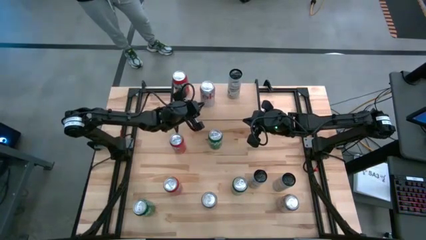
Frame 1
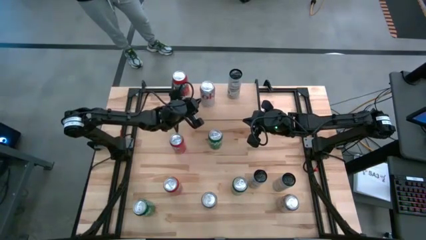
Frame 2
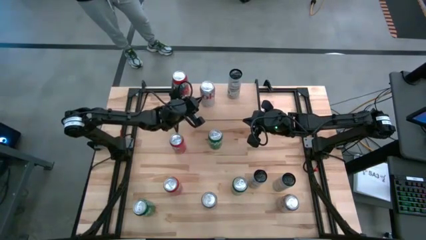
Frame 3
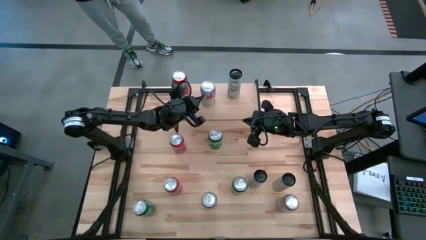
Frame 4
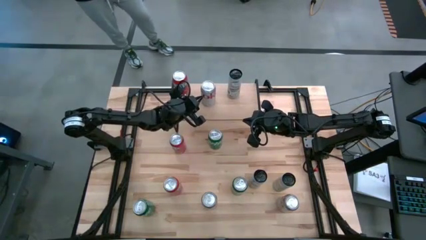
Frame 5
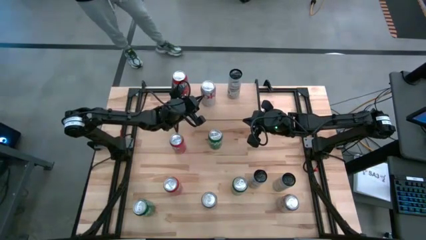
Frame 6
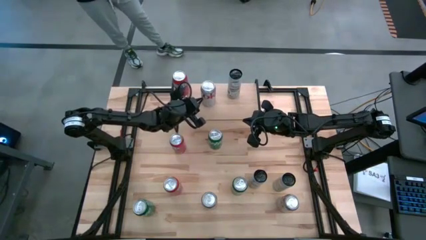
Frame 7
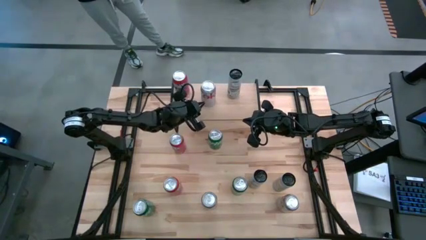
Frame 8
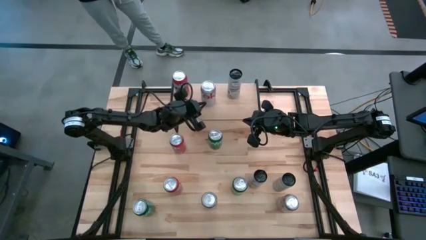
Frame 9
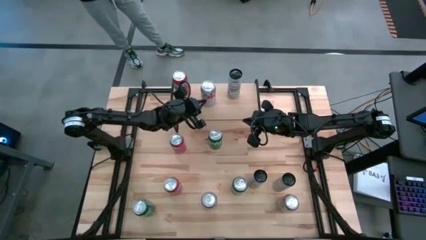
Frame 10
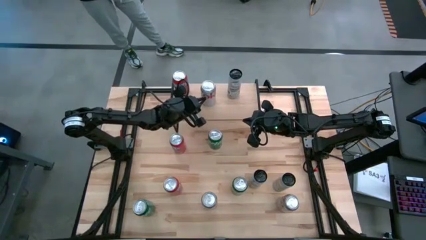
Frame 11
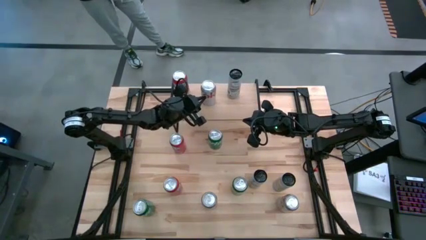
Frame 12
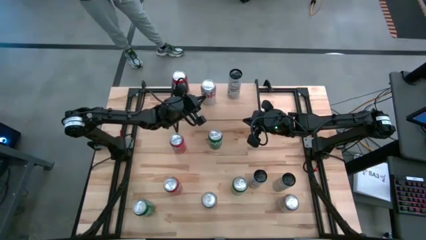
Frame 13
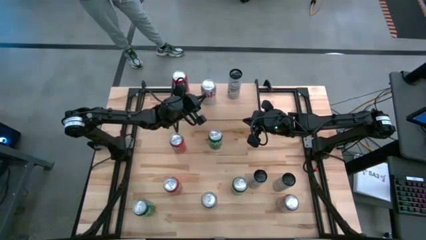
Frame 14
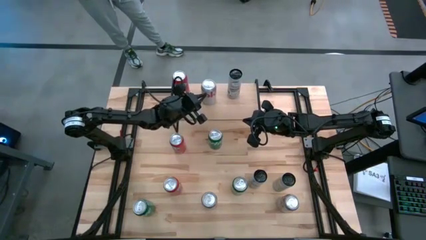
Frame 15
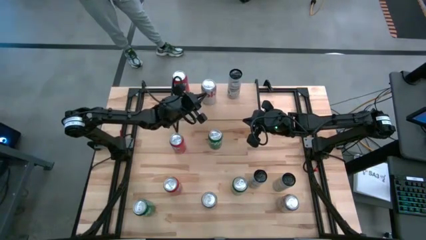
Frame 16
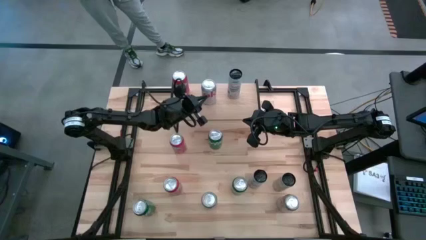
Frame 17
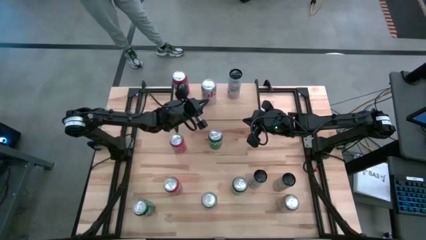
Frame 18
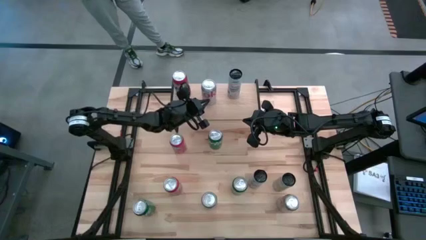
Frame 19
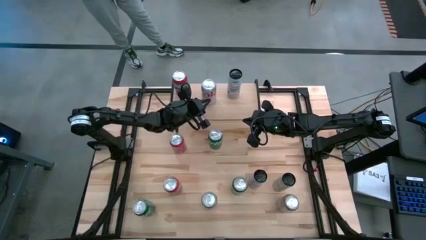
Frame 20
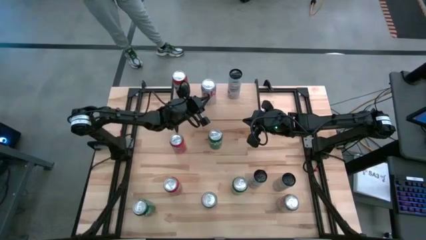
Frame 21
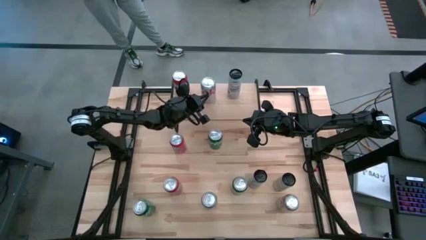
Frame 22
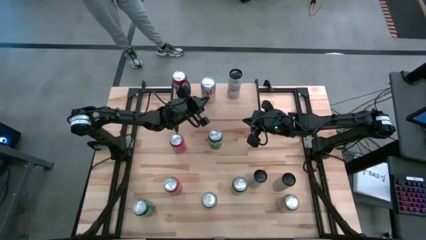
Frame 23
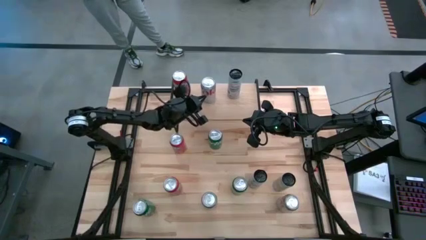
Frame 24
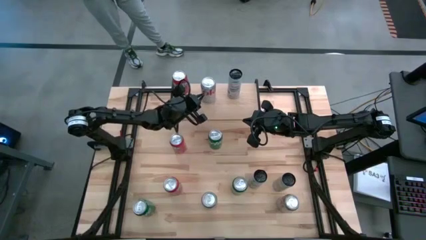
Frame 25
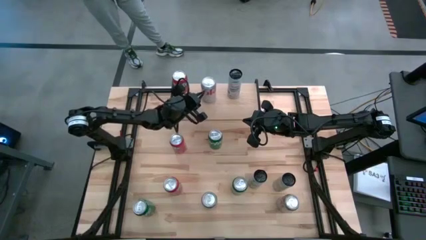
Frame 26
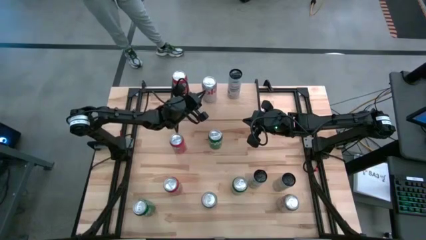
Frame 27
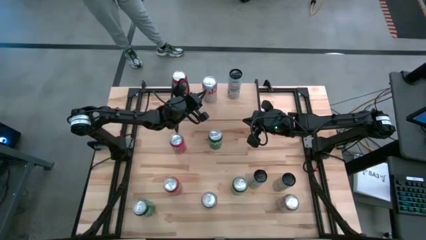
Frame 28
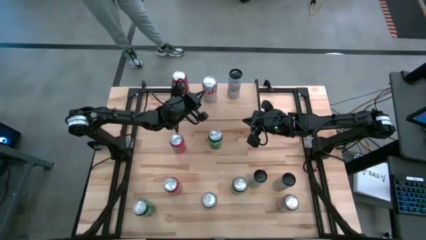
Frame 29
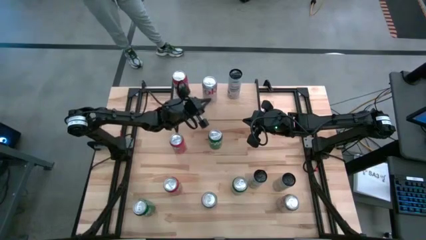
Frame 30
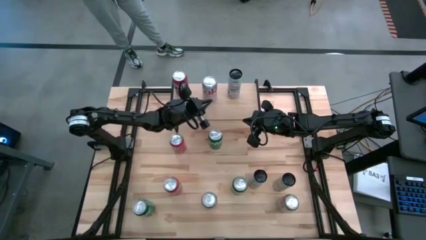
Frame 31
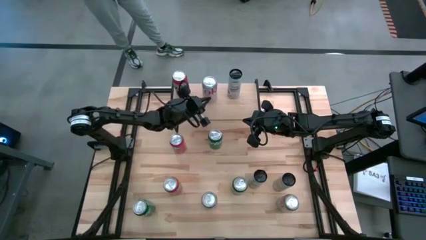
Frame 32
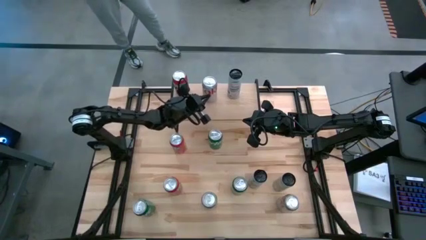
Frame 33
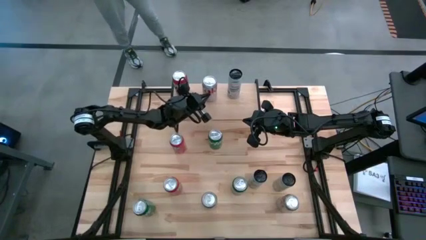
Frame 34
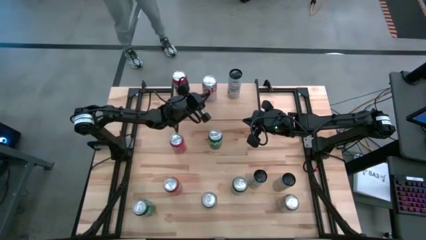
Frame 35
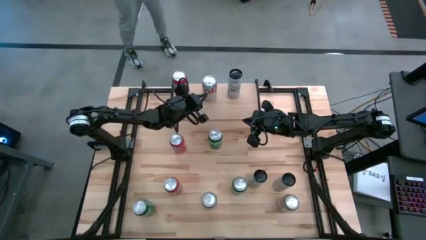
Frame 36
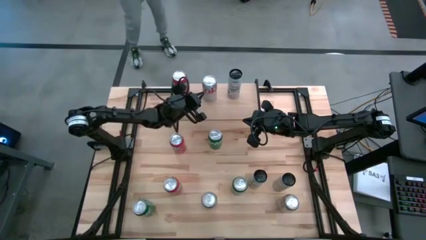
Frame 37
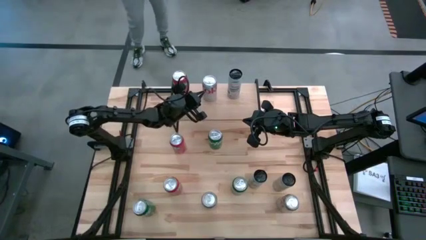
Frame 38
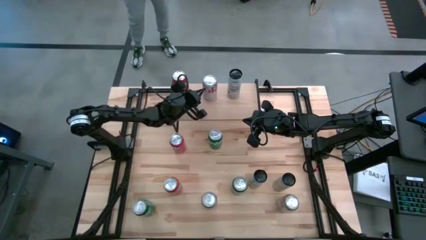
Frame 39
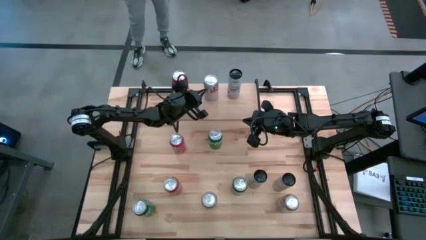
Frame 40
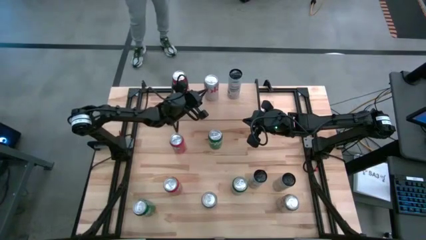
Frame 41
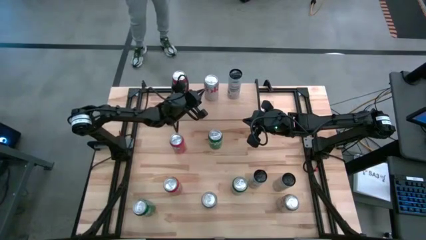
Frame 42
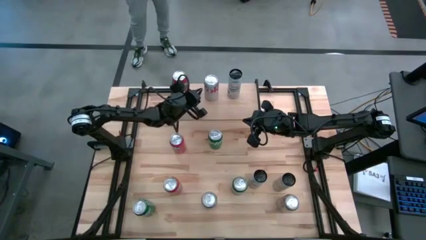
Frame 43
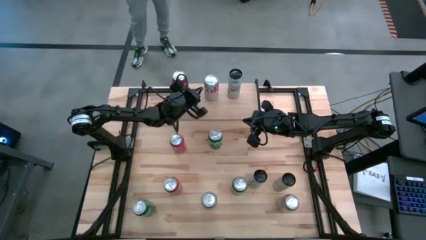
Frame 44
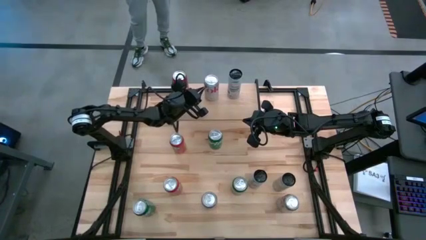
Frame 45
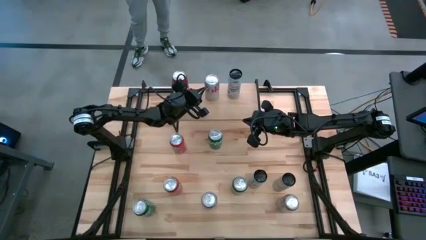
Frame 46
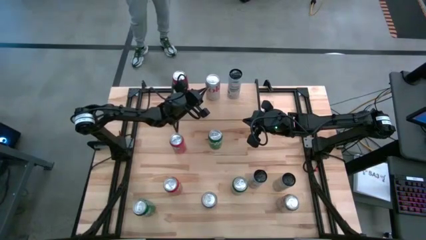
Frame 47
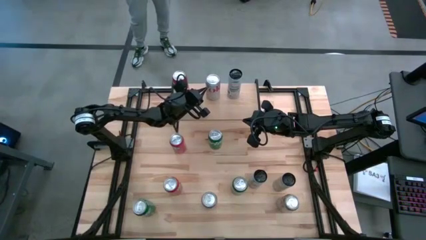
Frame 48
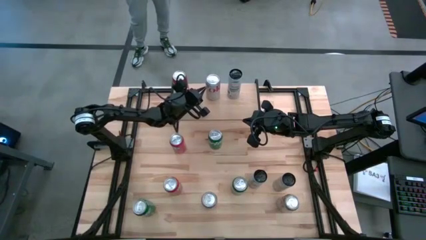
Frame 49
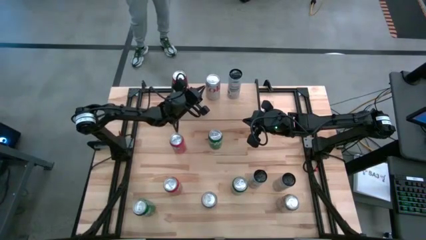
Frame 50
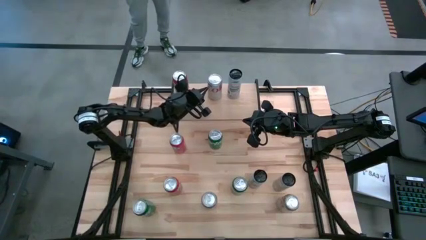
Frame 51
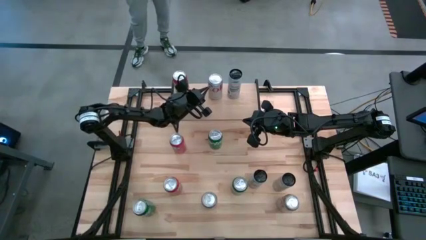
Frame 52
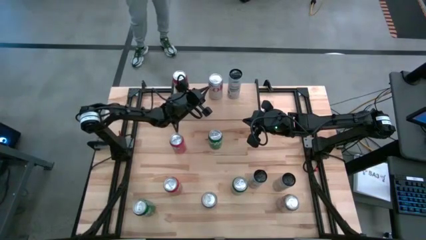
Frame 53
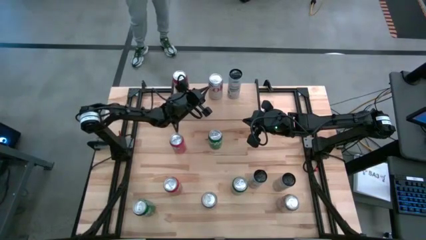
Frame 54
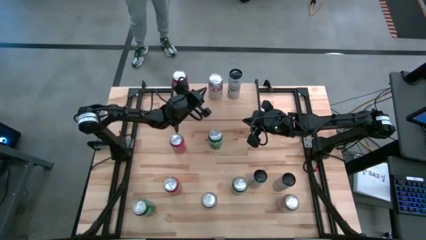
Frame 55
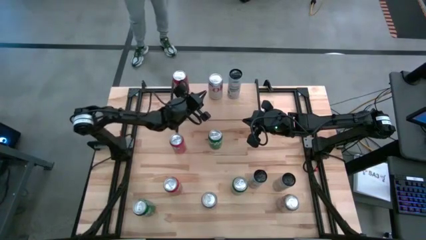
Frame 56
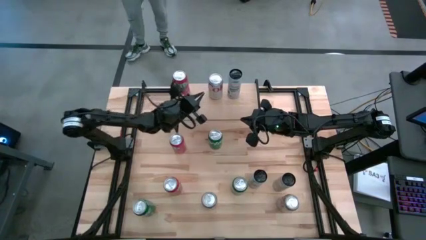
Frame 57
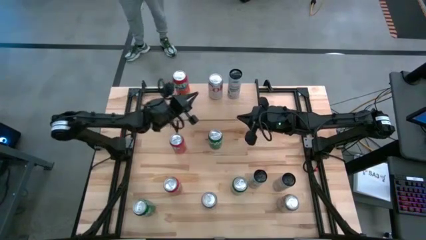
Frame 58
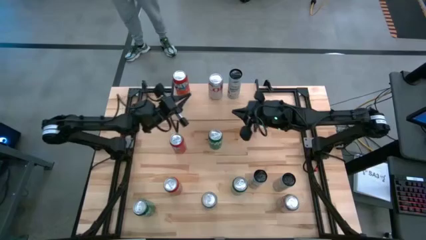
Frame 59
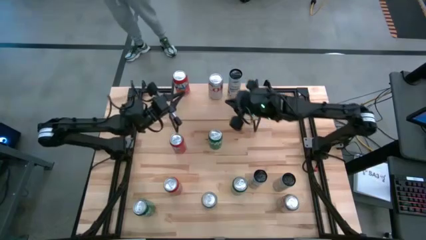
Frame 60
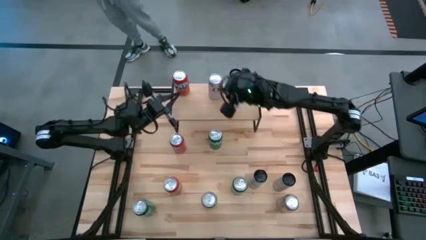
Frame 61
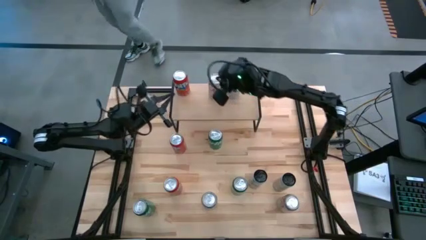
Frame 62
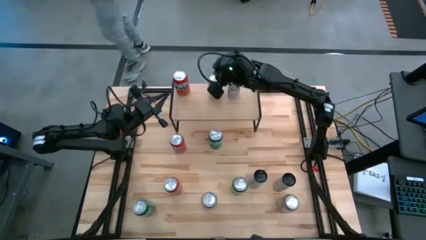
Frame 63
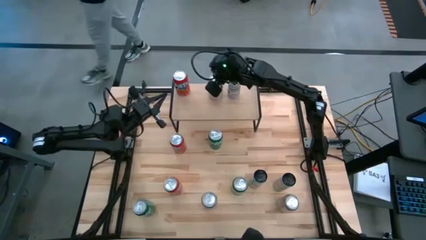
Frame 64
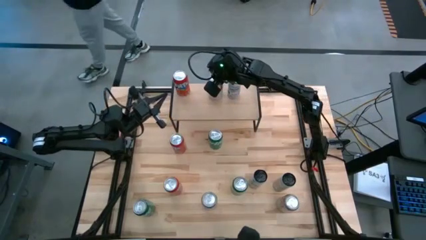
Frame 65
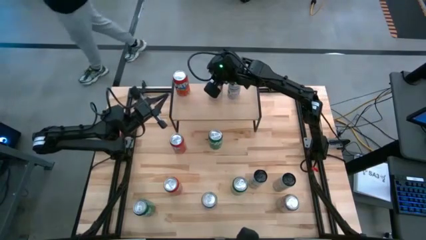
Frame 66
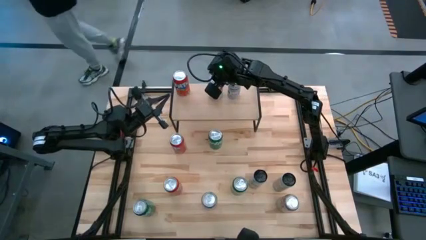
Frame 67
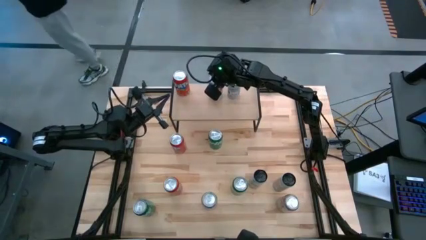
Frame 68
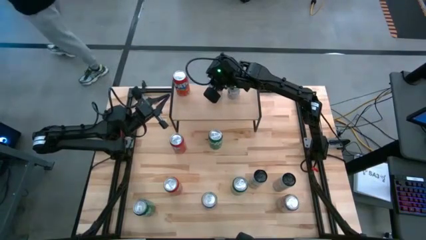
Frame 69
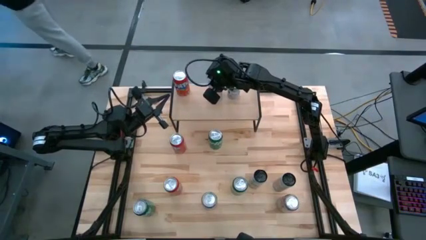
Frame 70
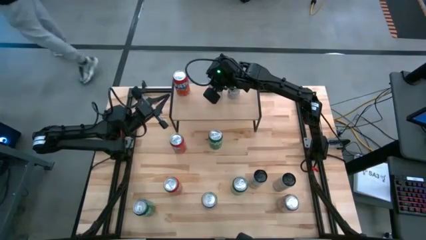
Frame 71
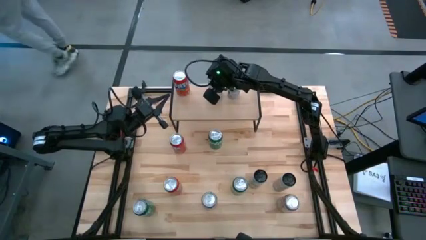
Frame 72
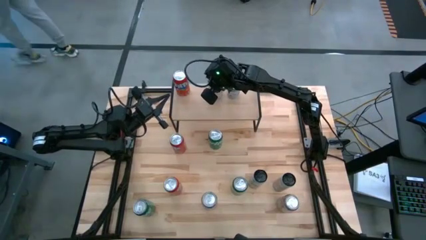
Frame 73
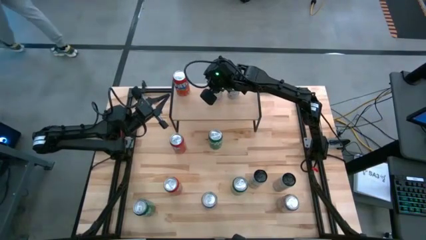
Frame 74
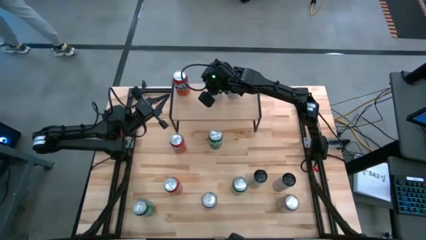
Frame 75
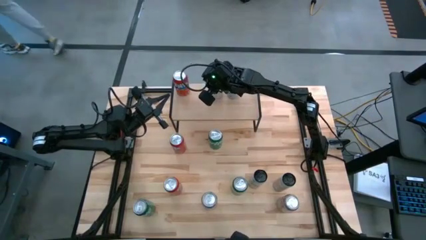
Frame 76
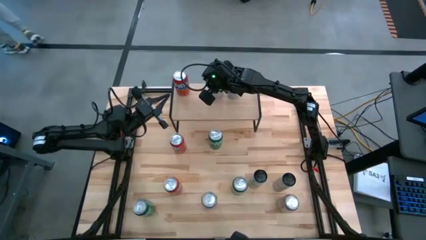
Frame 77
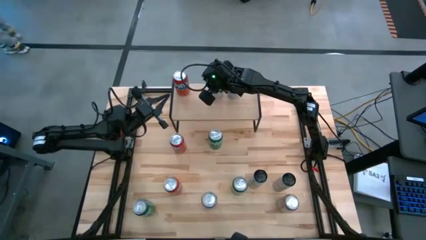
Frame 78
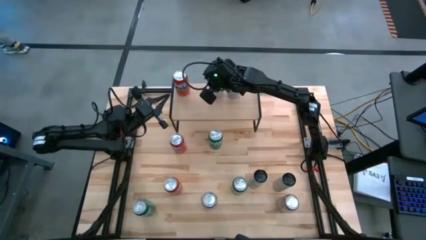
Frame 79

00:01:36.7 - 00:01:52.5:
Task: Place canned beverage on shelf
Put the silver soda can on the shelf
